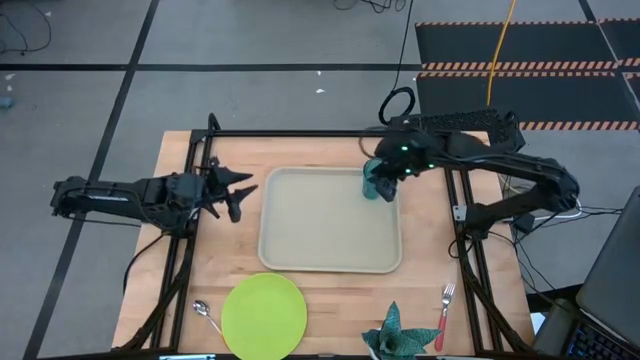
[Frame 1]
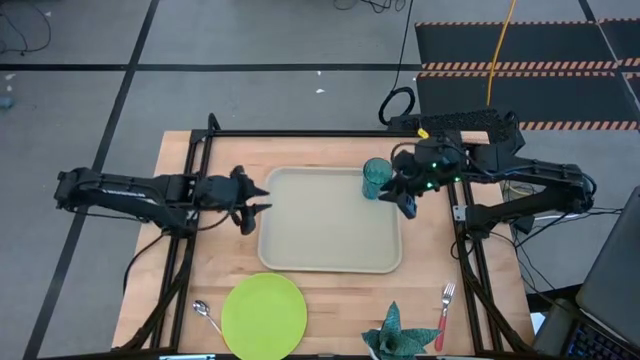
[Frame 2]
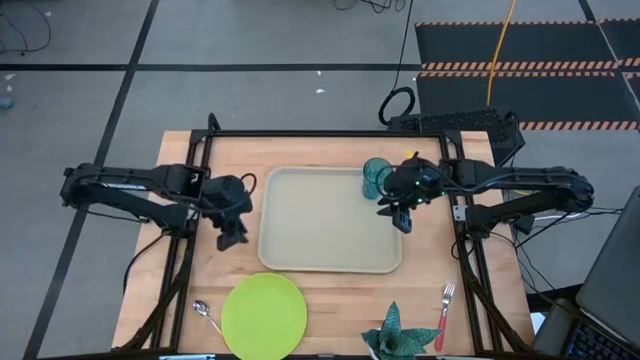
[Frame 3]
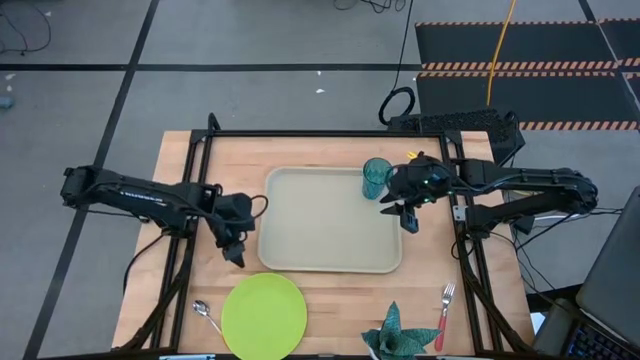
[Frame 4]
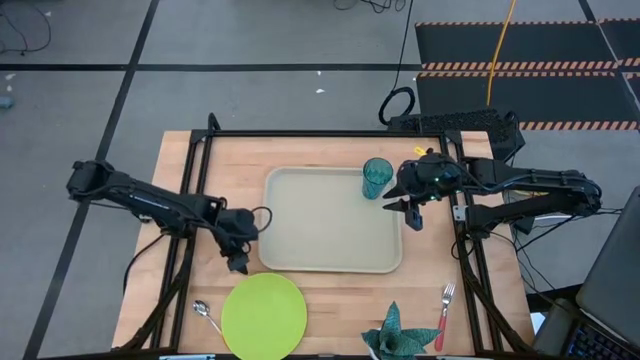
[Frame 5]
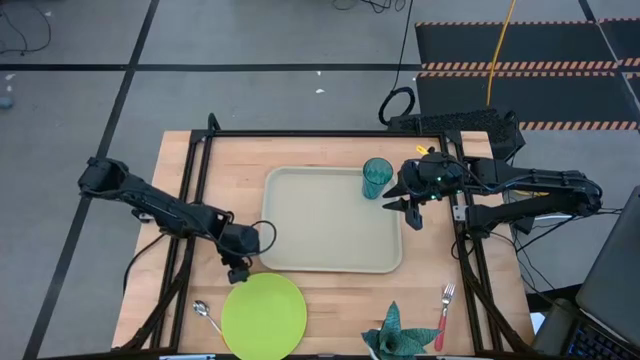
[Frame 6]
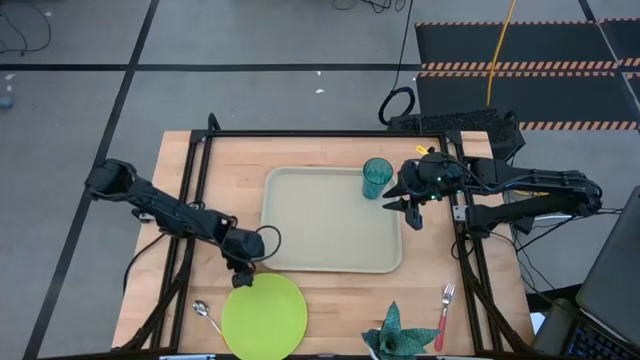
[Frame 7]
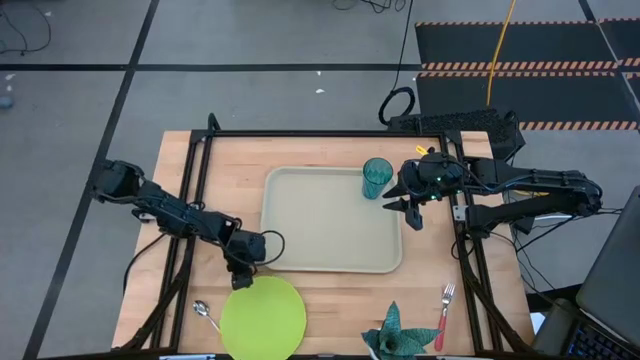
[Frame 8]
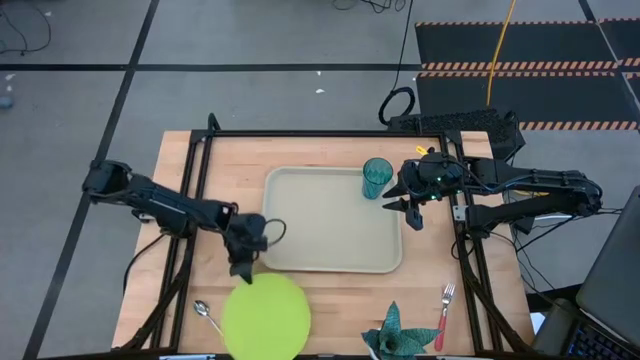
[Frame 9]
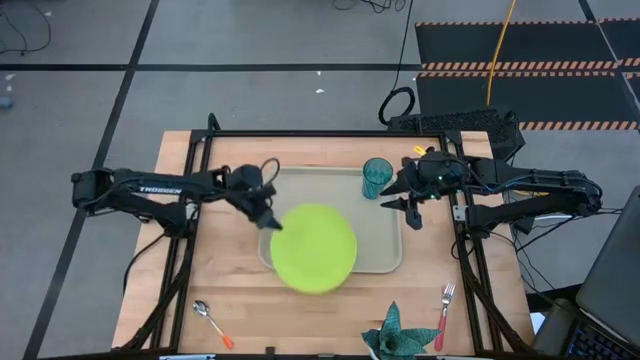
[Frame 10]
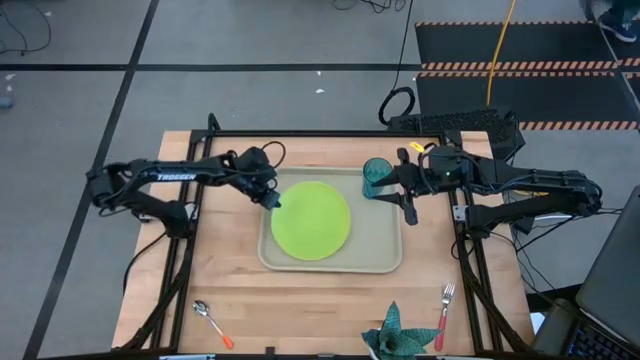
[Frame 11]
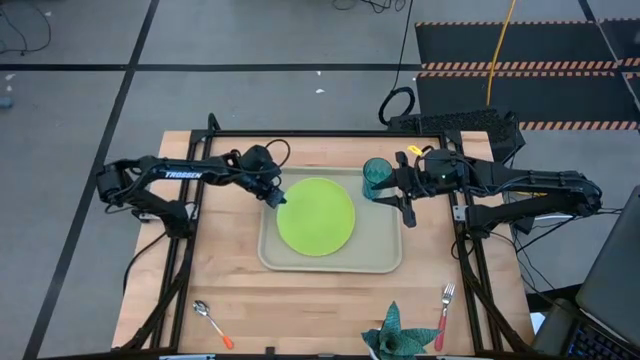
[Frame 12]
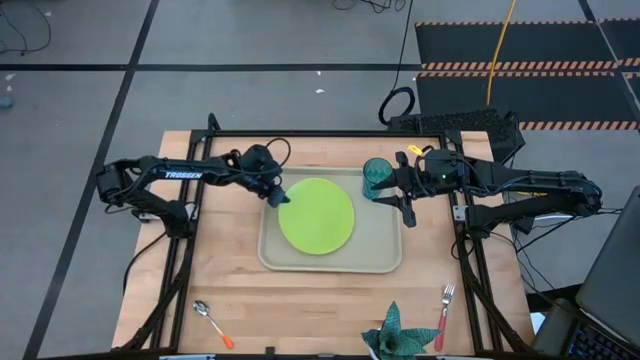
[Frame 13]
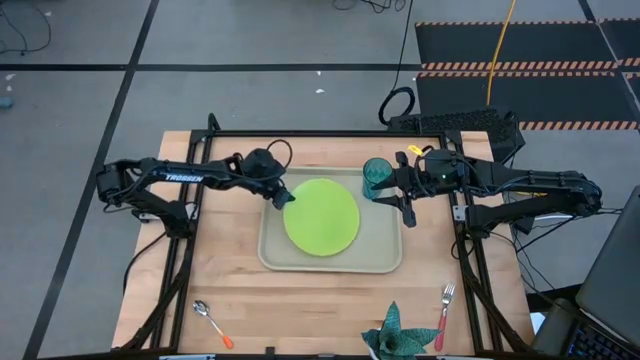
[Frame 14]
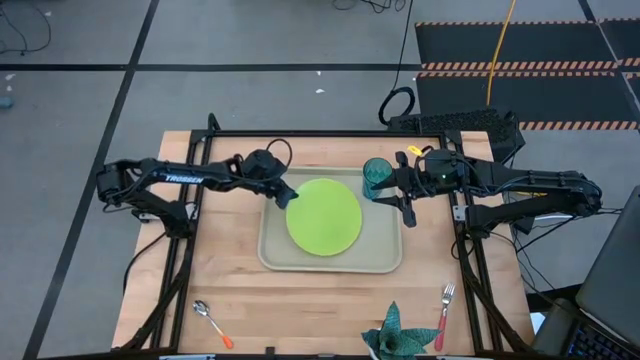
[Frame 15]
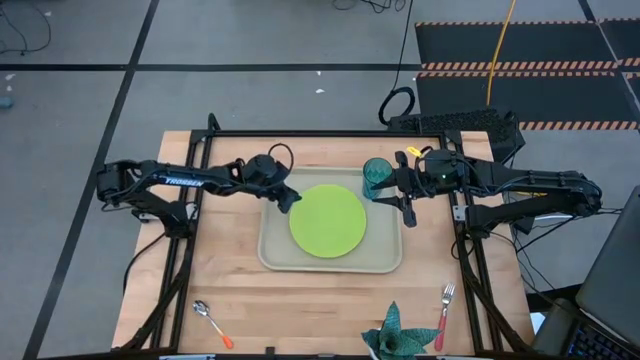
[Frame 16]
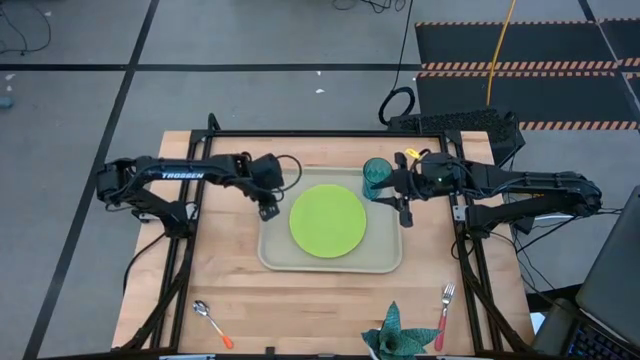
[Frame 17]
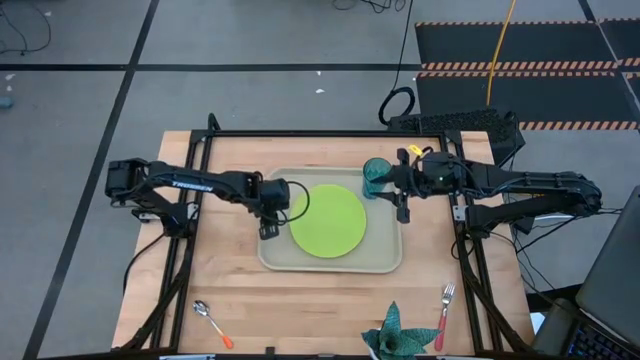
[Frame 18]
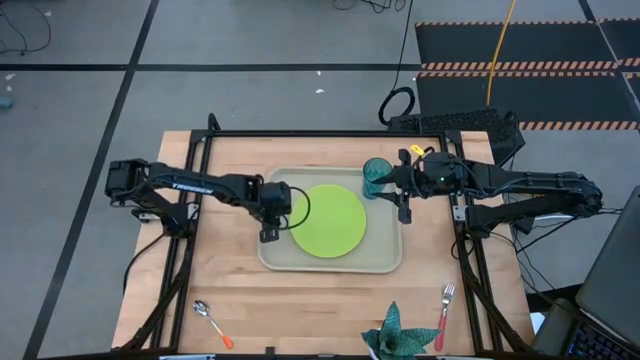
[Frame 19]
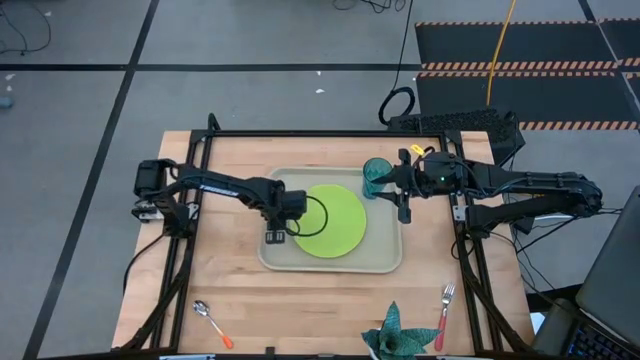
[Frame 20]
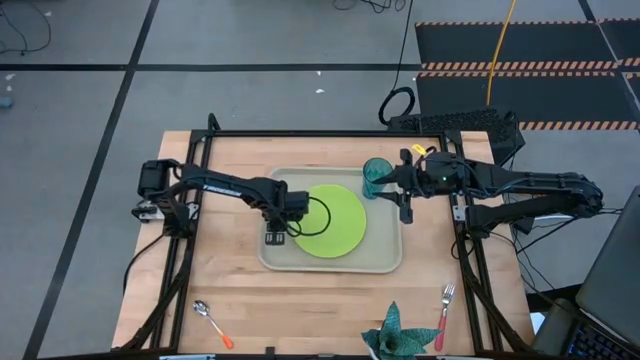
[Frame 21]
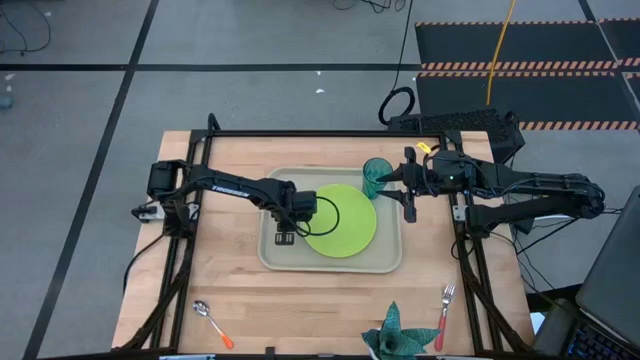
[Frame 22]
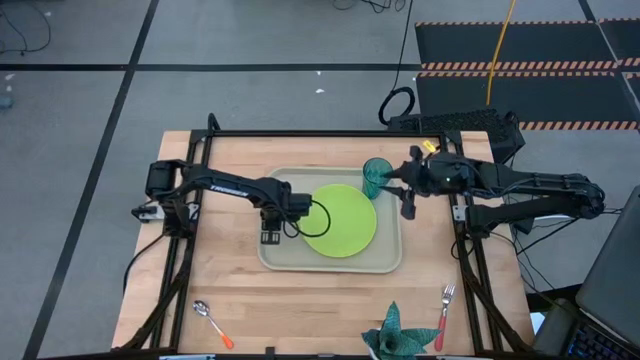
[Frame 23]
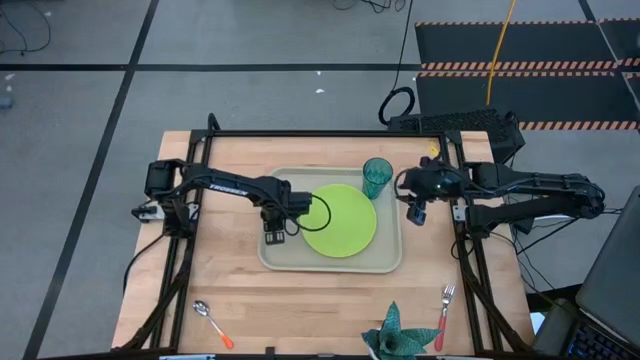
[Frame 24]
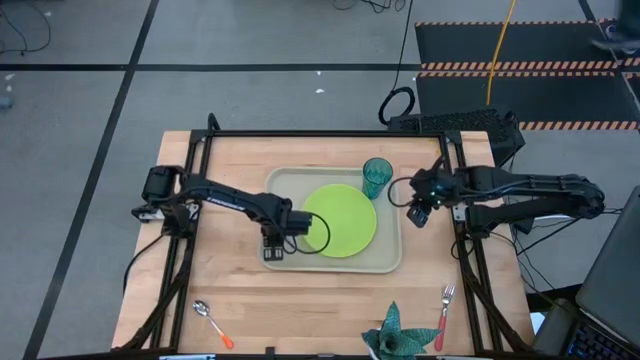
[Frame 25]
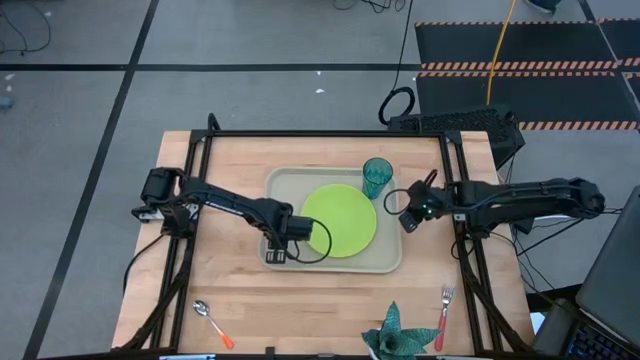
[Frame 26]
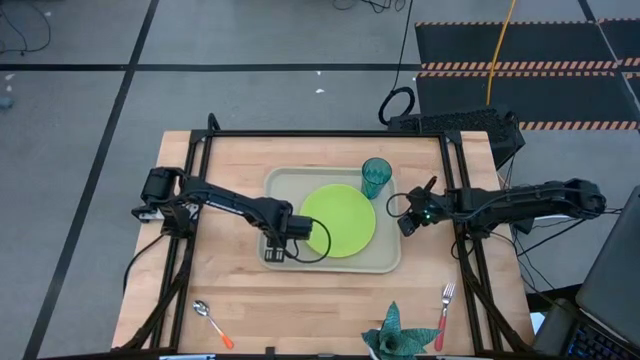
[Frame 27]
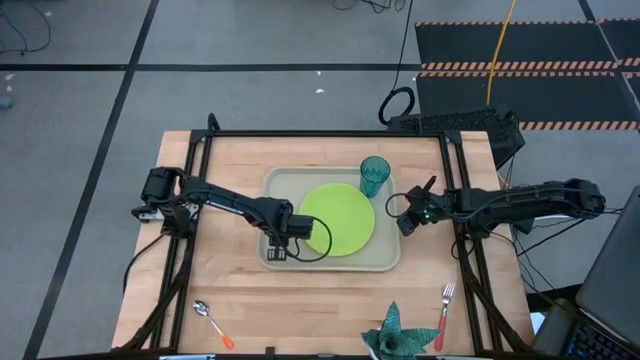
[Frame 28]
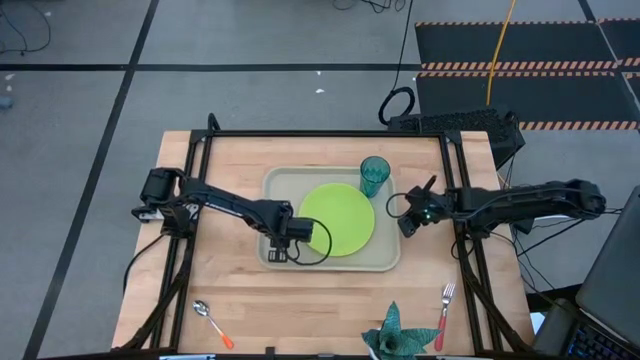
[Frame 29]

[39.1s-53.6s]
Task: Pick and place plate/cup/fork/spoon on tray
Put the light green plate on the light brown serving tray to the bottom left of the blue glass
